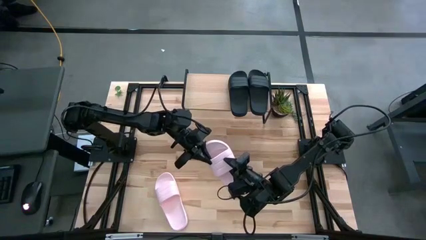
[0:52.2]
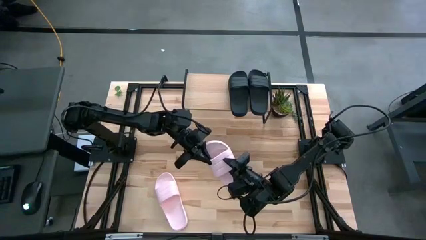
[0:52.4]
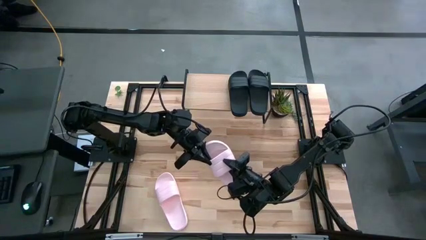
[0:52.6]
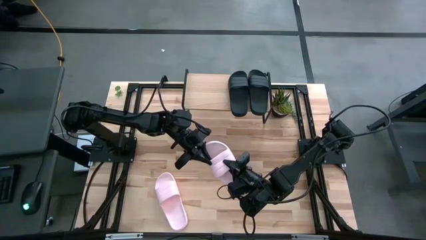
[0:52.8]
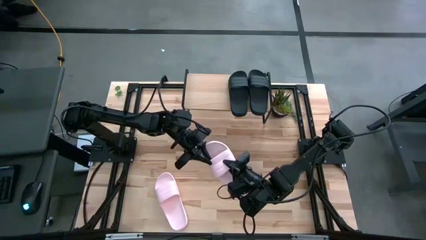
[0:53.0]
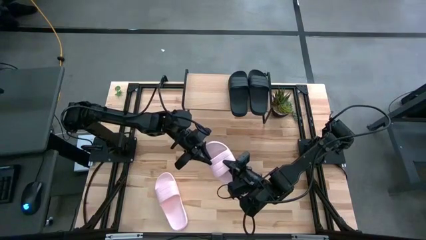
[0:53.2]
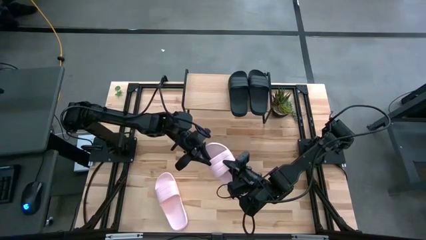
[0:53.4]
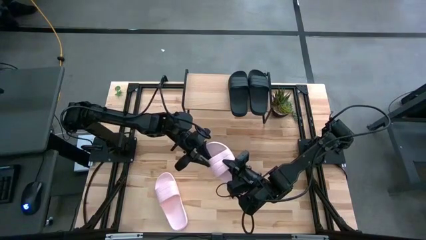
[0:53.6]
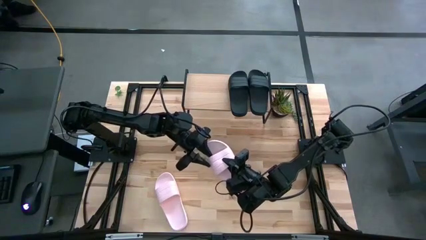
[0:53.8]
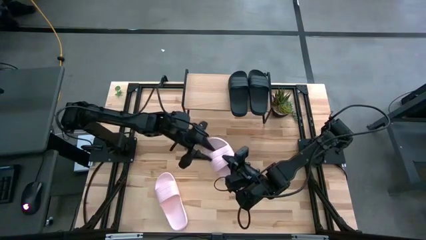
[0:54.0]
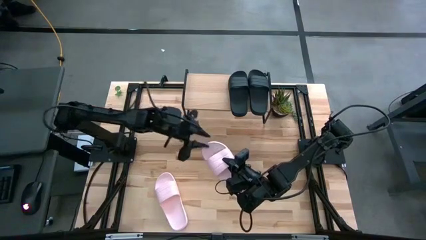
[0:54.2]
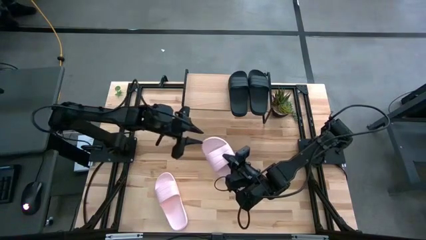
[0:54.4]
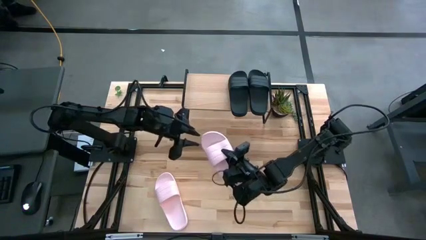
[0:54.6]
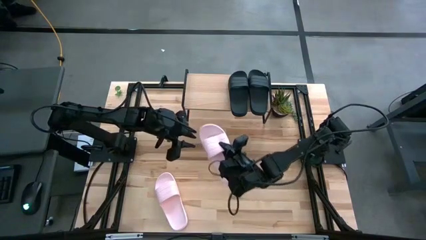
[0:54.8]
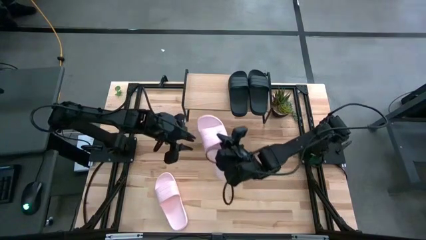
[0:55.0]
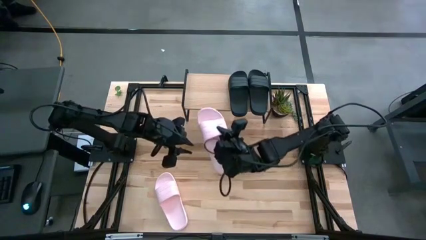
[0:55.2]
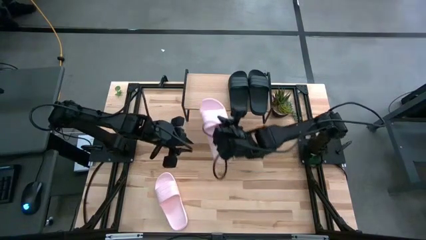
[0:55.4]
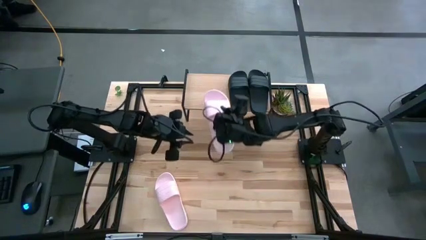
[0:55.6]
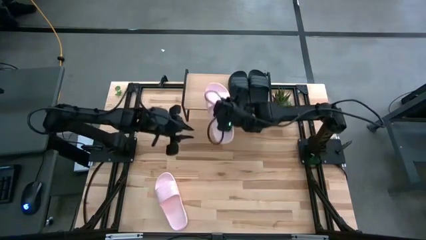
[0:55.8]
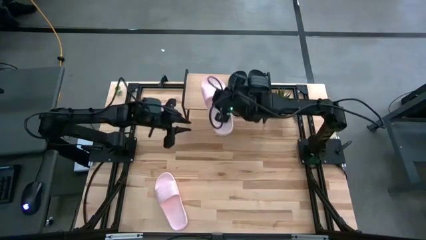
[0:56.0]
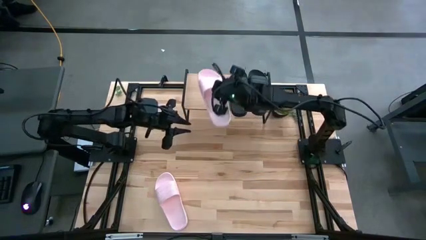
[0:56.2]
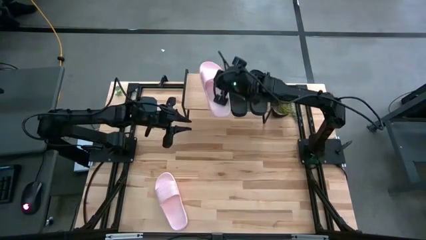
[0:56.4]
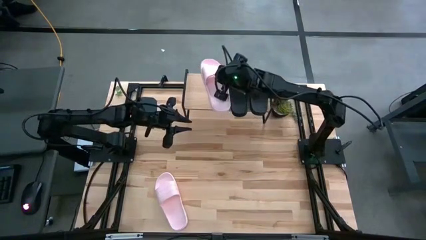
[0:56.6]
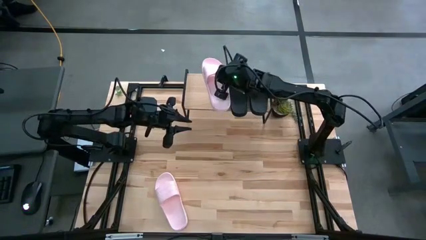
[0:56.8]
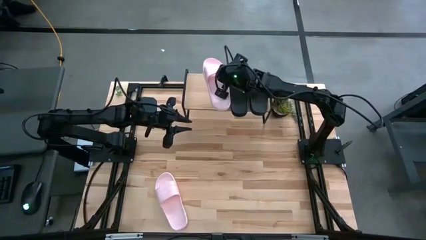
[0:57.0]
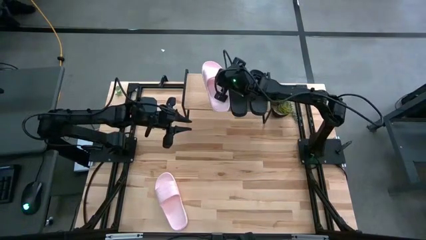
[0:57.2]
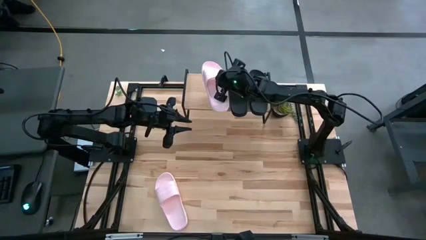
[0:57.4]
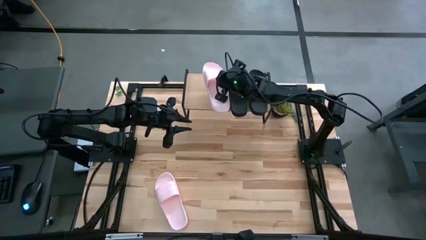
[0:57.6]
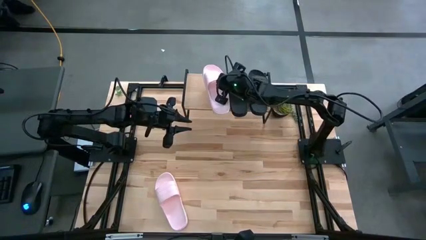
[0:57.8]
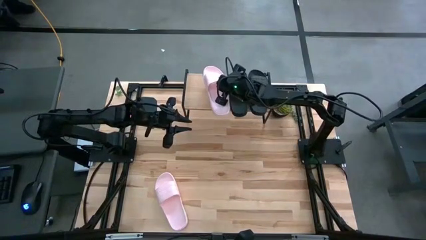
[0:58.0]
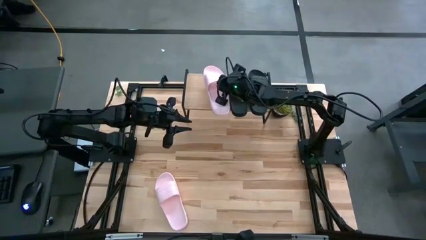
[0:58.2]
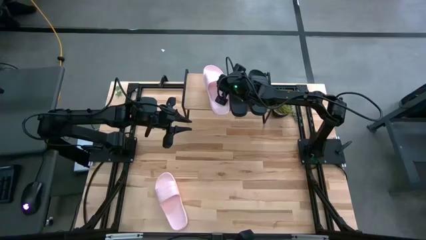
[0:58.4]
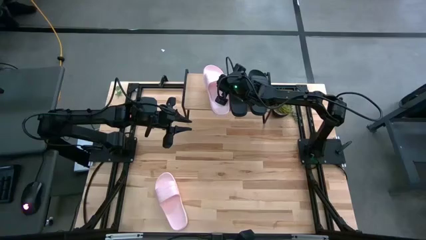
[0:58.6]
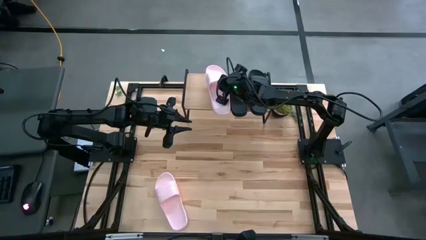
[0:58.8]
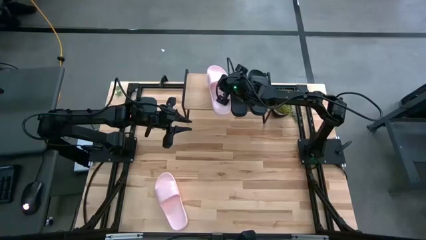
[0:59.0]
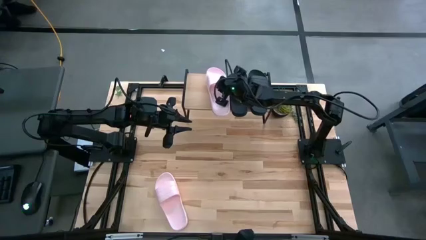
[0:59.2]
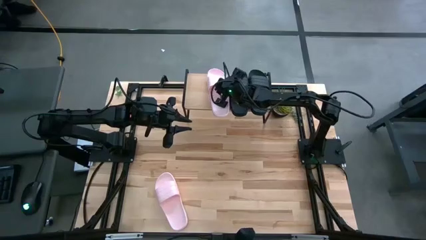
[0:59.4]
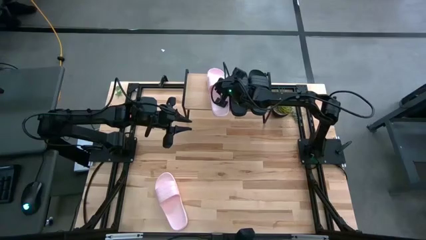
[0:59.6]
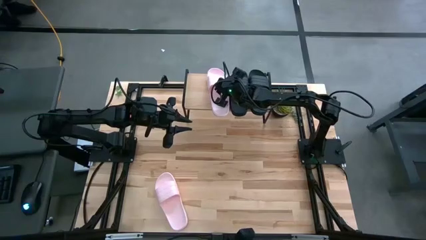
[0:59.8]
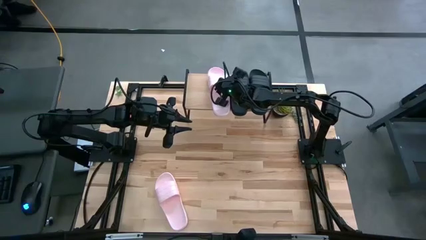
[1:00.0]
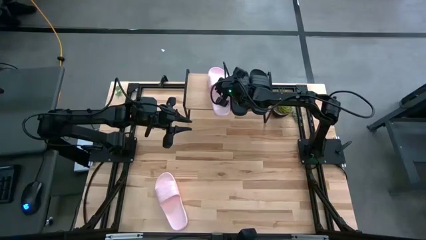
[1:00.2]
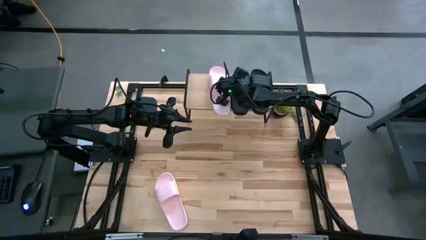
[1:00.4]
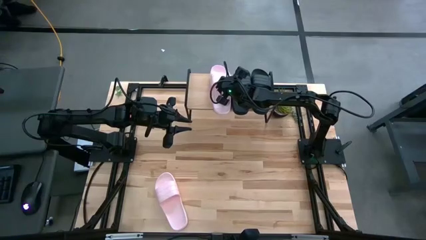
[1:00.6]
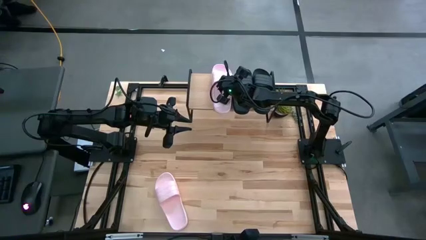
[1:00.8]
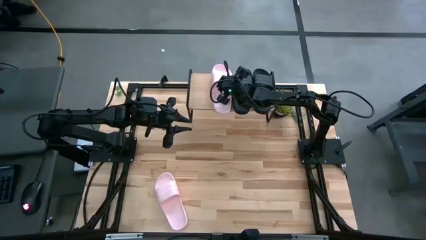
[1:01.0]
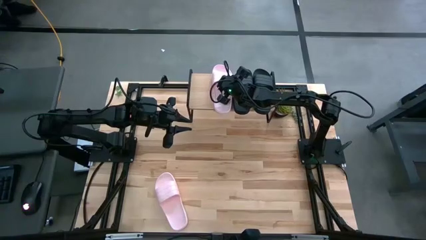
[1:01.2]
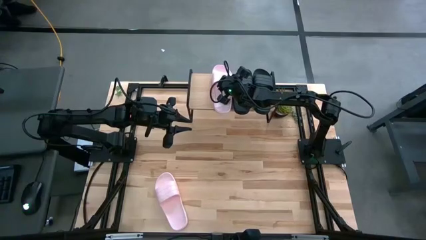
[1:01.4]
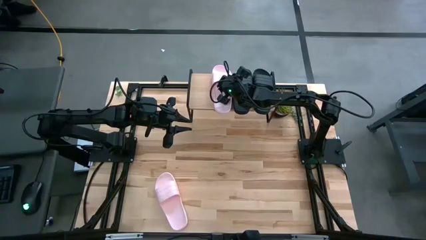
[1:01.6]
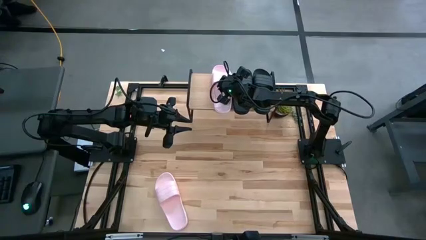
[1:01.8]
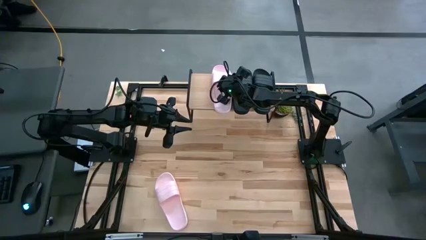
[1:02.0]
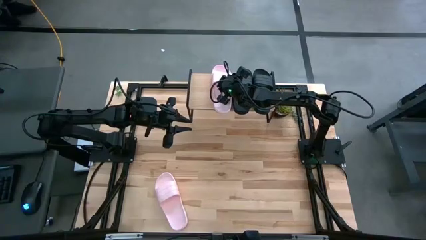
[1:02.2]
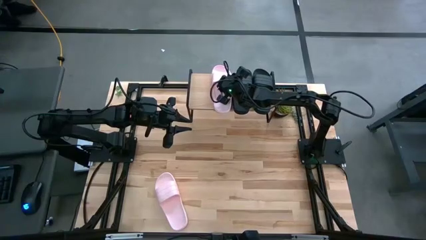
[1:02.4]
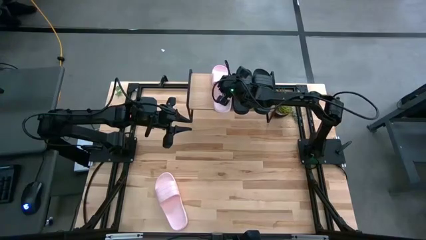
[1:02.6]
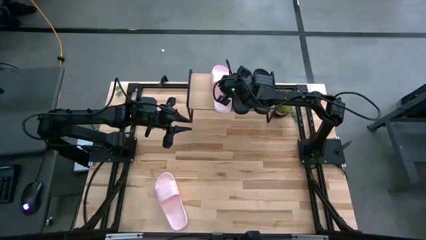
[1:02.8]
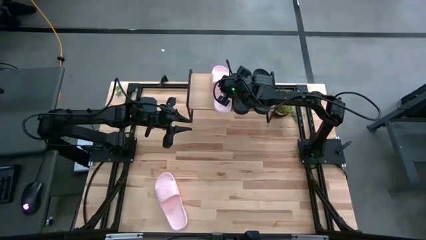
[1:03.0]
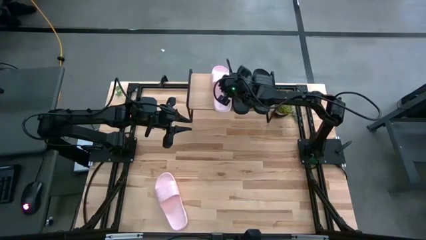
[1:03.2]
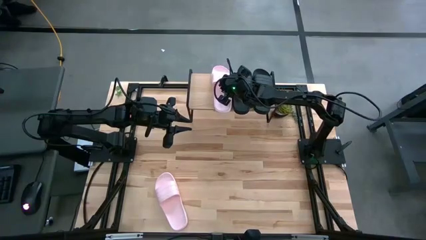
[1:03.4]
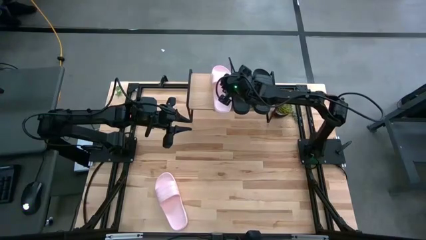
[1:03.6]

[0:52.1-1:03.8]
Task: Pick and place slides into the shelf
Put the right pink slipper on the shelf
